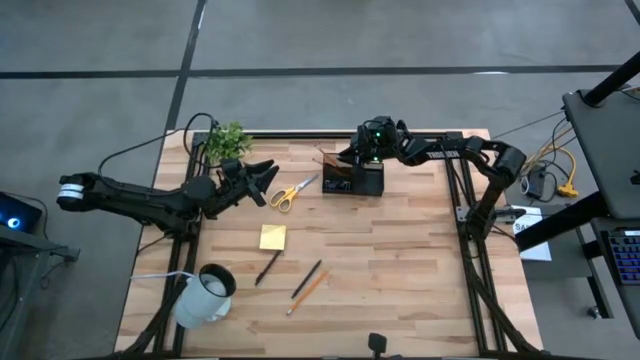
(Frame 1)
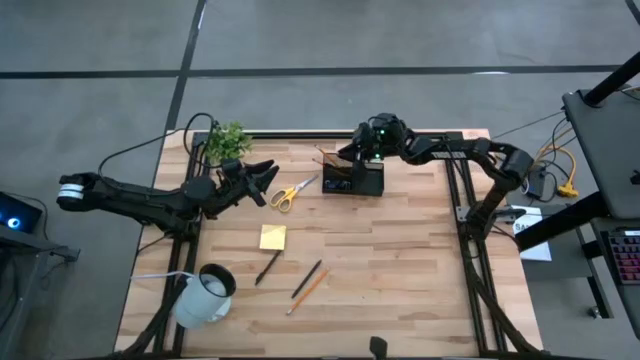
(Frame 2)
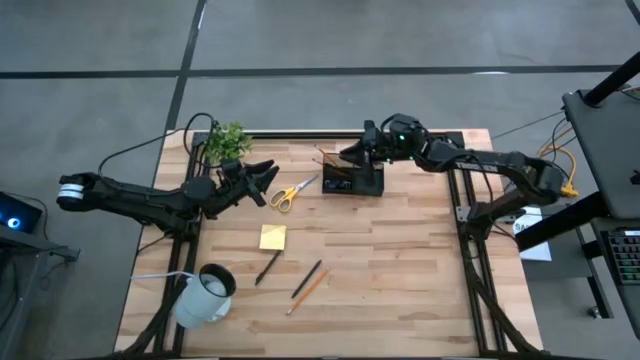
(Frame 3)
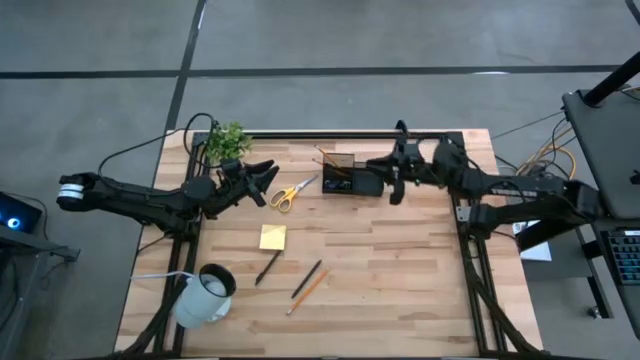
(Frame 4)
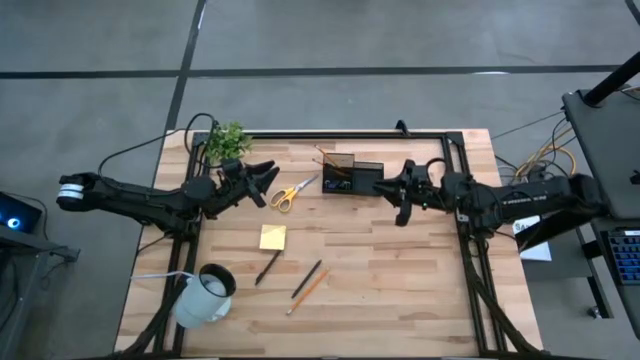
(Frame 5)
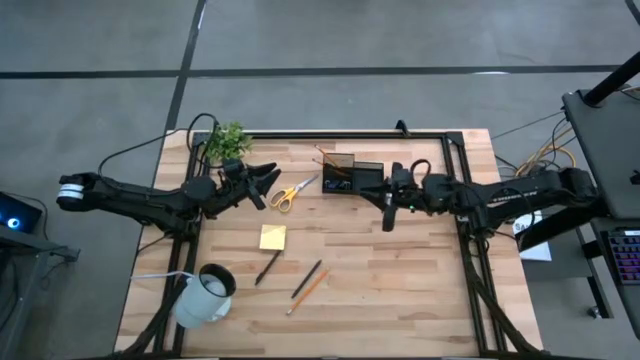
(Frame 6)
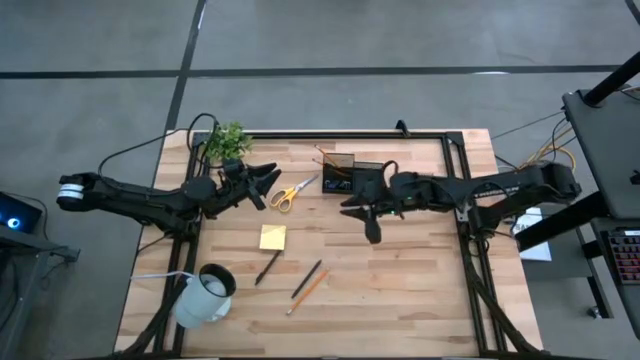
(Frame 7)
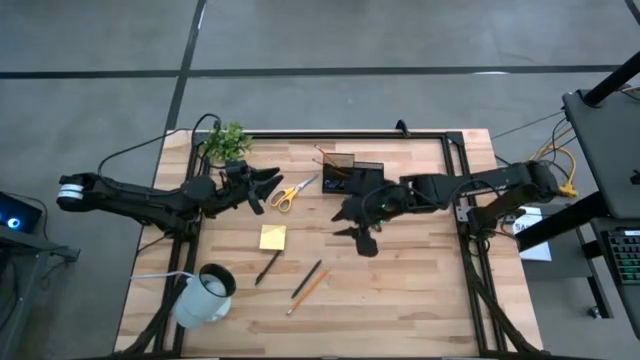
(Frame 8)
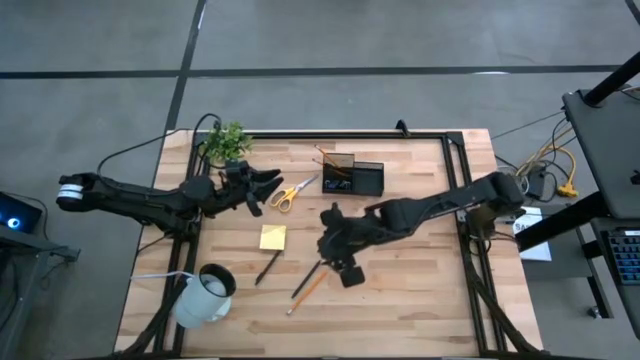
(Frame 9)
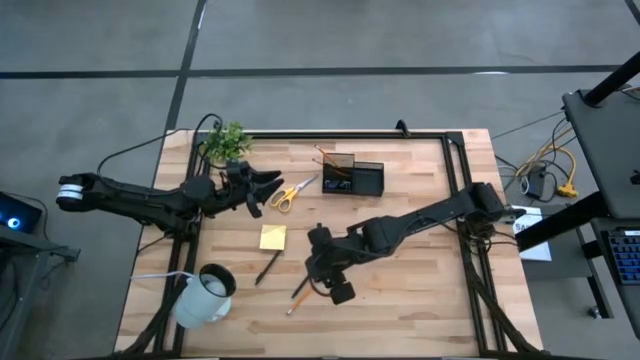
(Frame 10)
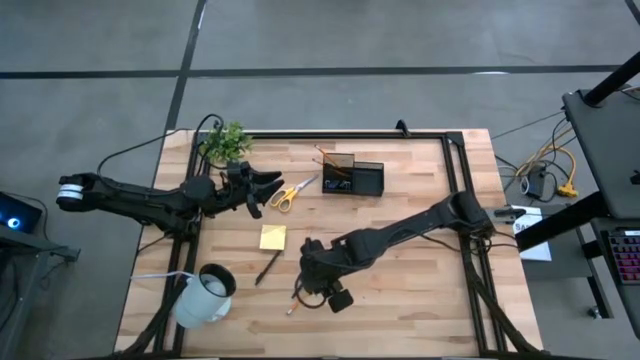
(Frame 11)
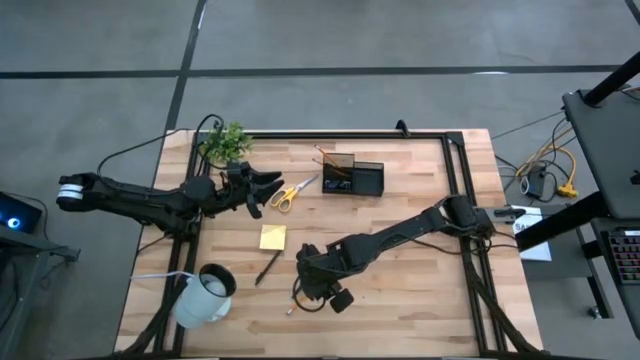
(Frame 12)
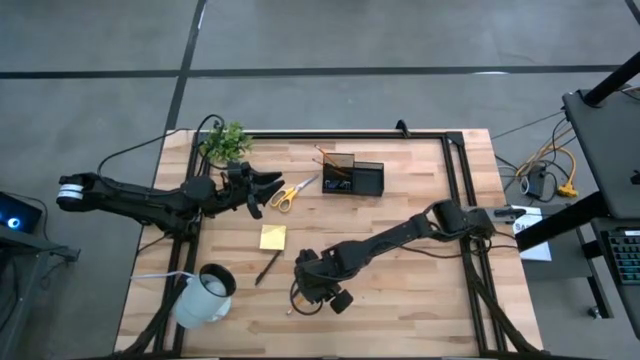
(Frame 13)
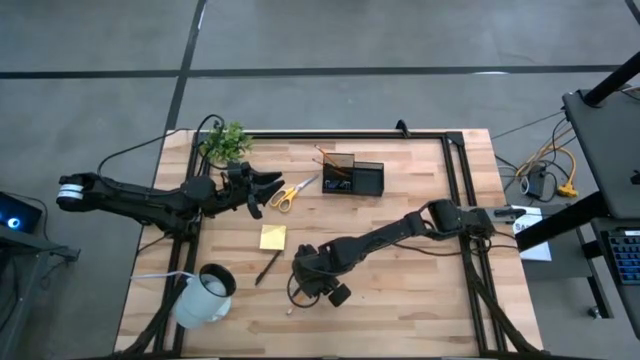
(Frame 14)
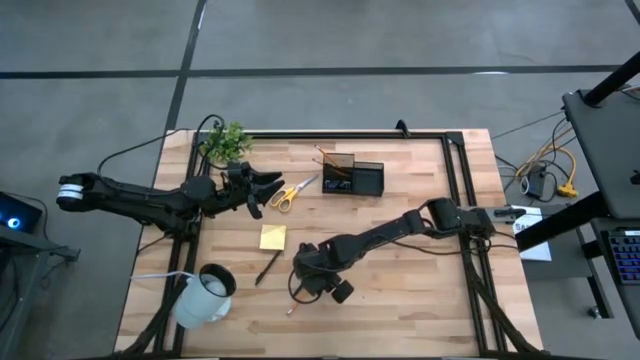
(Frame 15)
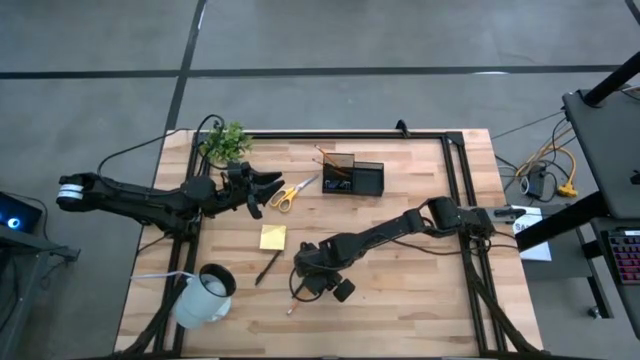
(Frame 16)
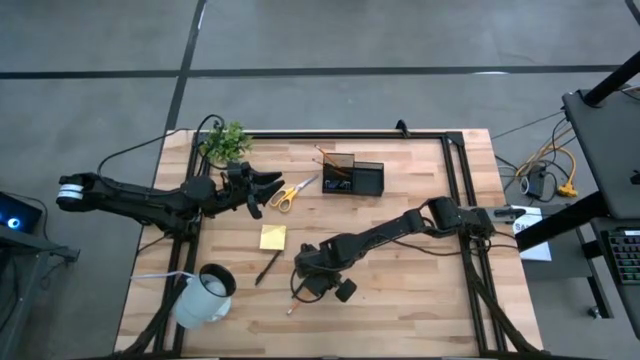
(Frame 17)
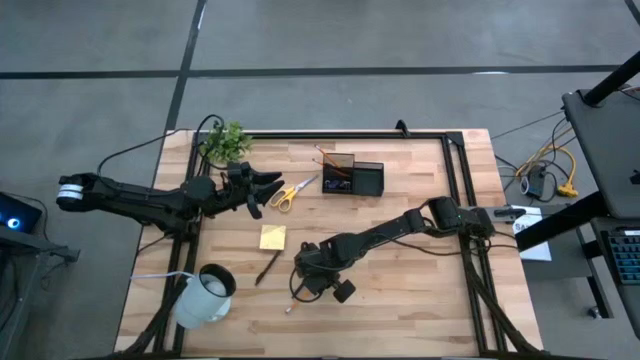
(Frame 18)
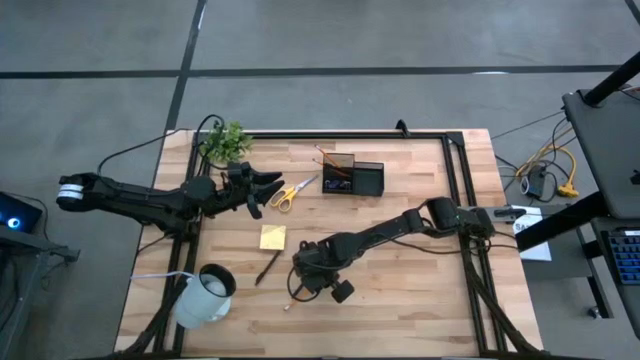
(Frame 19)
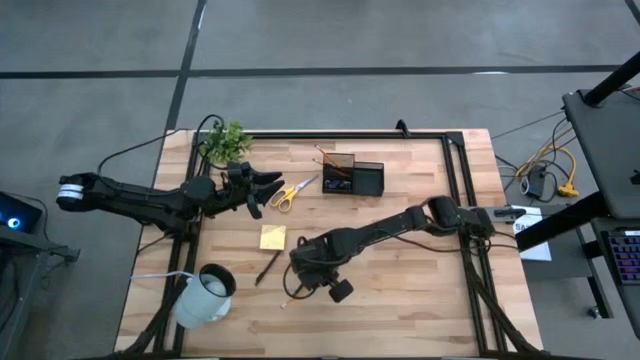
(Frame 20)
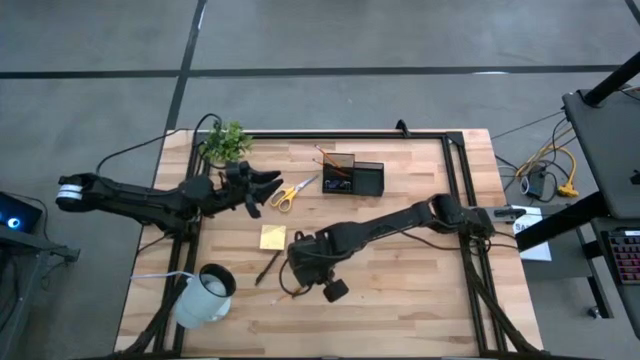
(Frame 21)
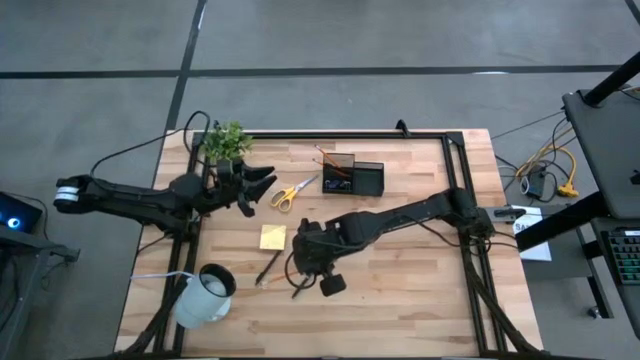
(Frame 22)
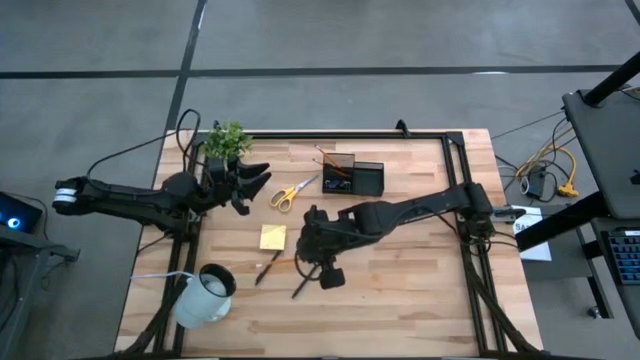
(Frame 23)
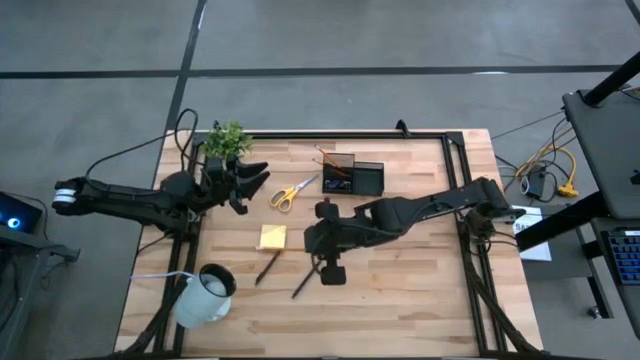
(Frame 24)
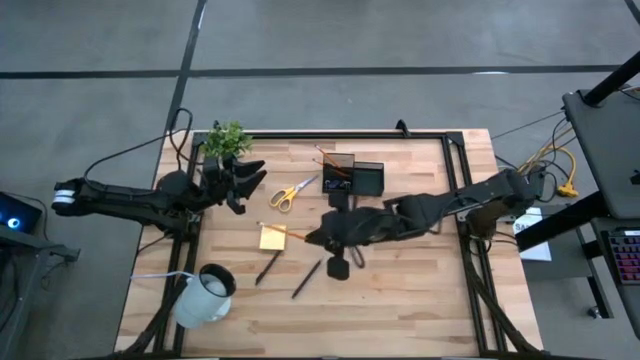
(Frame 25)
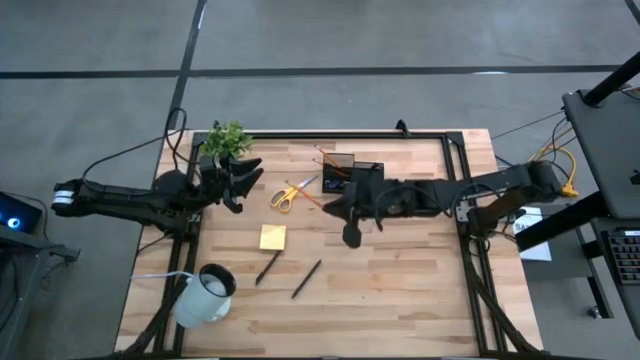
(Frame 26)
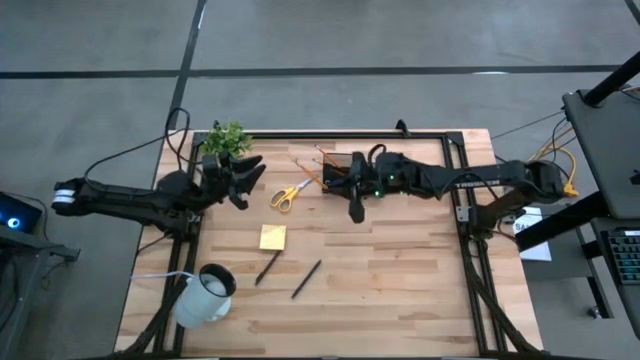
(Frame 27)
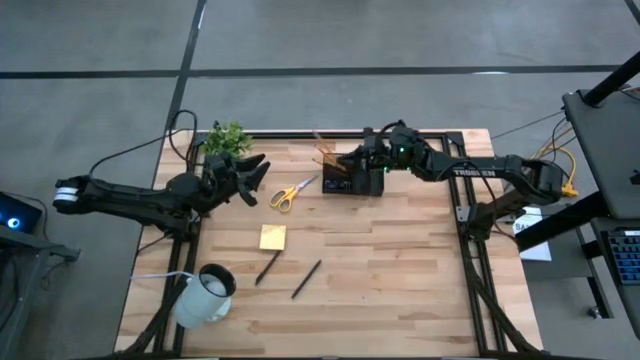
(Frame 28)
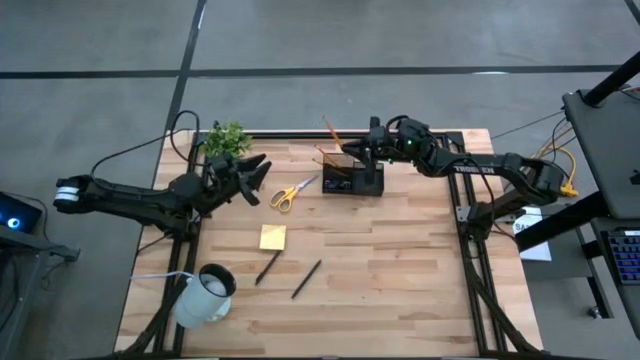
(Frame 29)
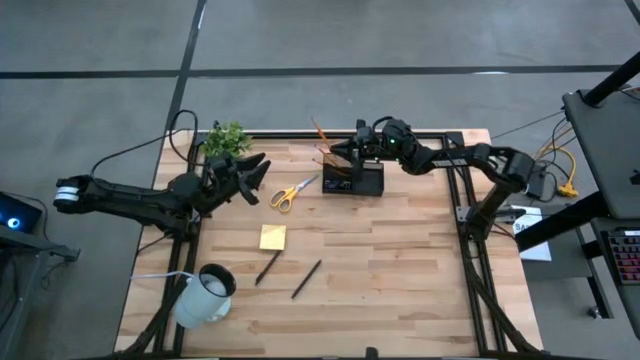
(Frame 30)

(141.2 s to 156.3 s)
Task: Pick and place office supplies into organizer
Put the pencil into the desk organizer

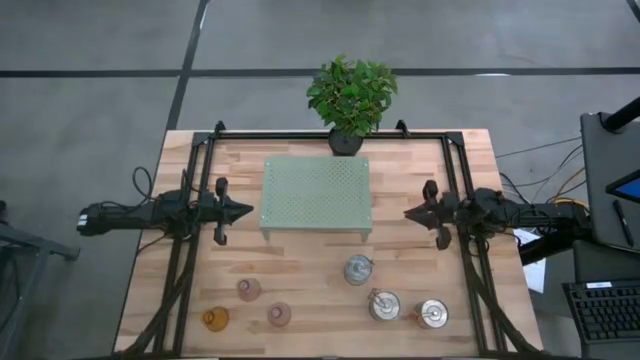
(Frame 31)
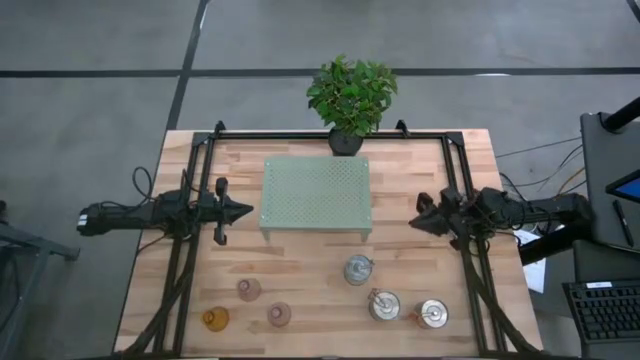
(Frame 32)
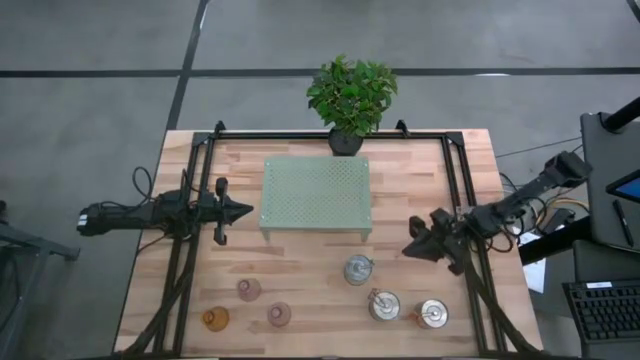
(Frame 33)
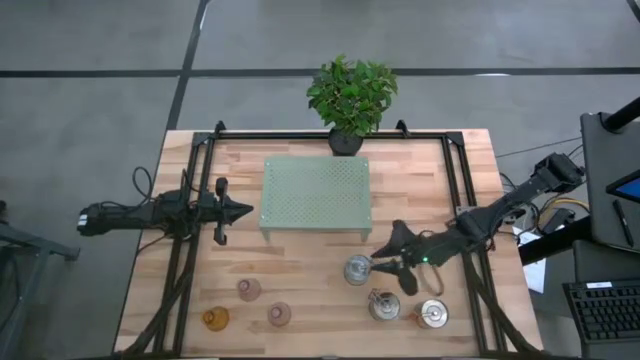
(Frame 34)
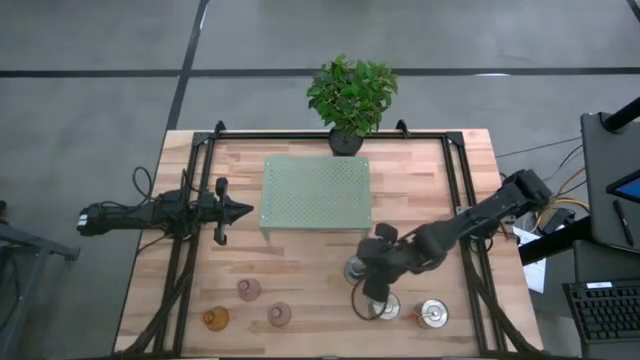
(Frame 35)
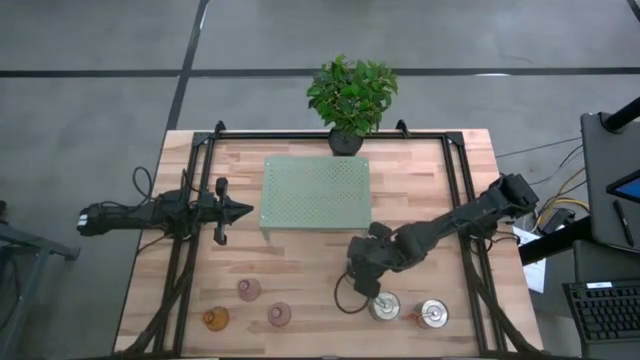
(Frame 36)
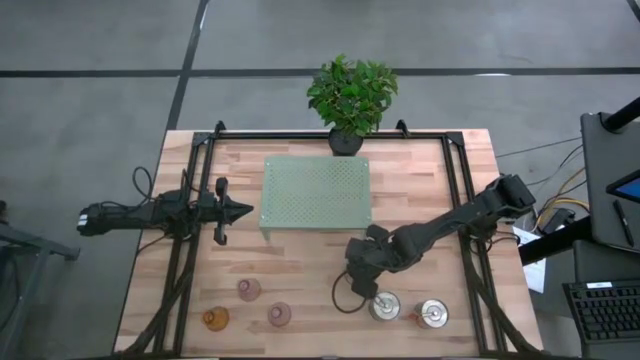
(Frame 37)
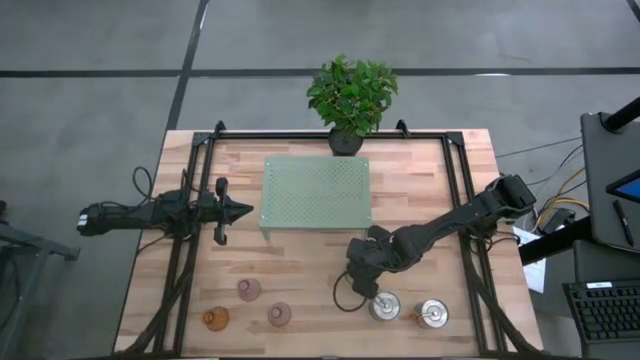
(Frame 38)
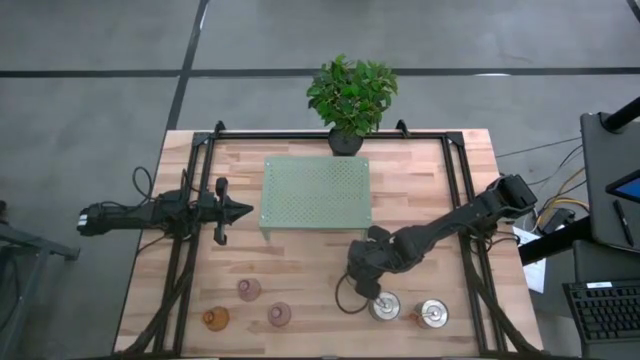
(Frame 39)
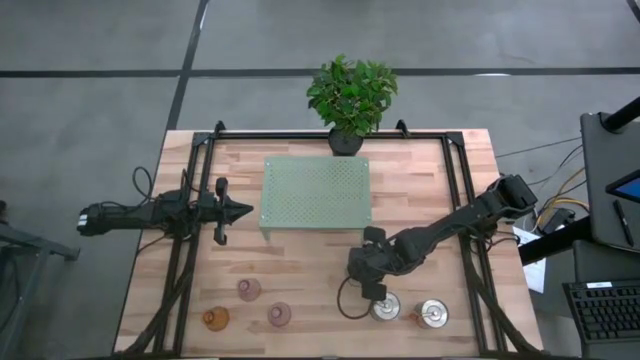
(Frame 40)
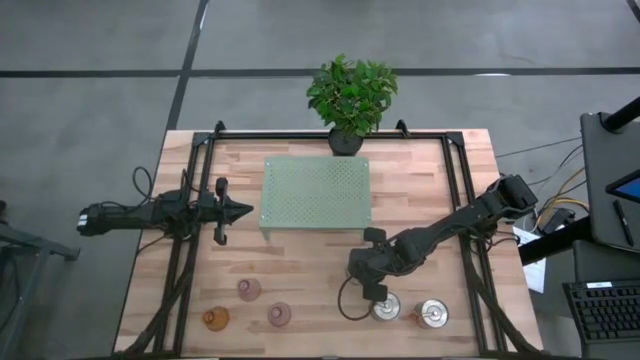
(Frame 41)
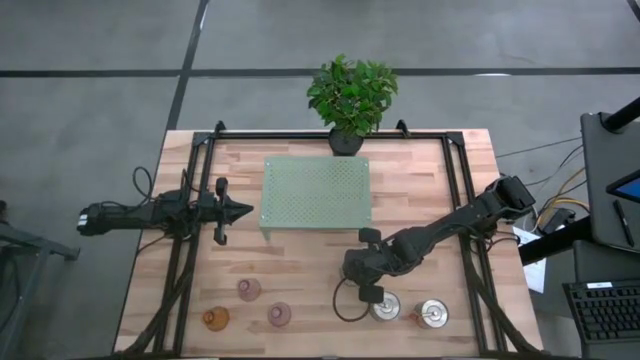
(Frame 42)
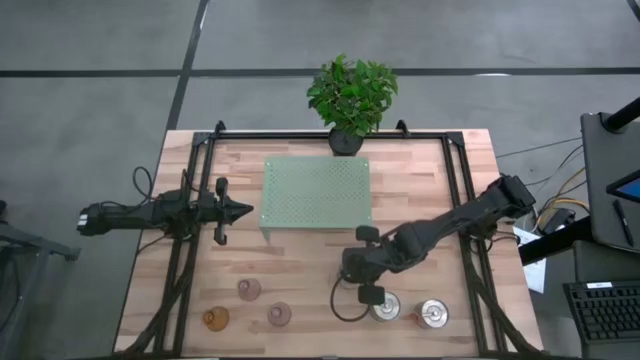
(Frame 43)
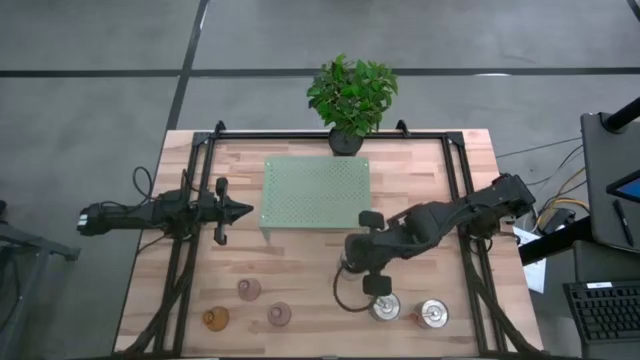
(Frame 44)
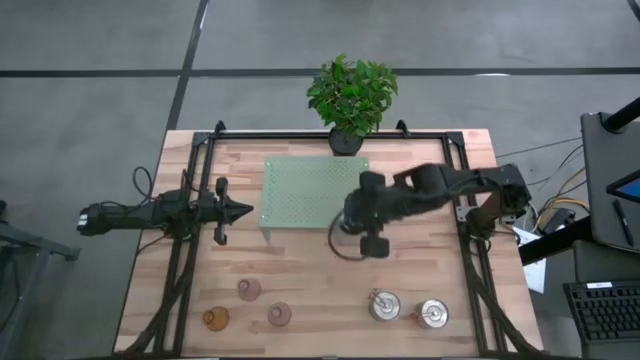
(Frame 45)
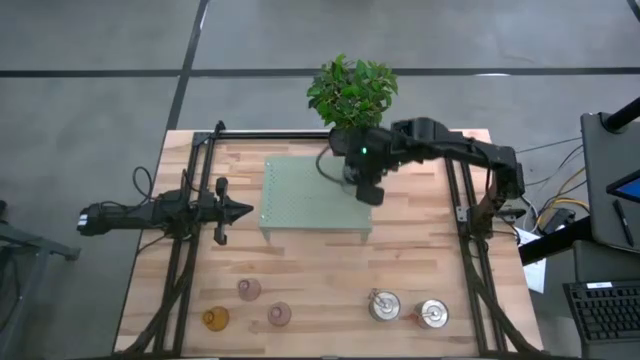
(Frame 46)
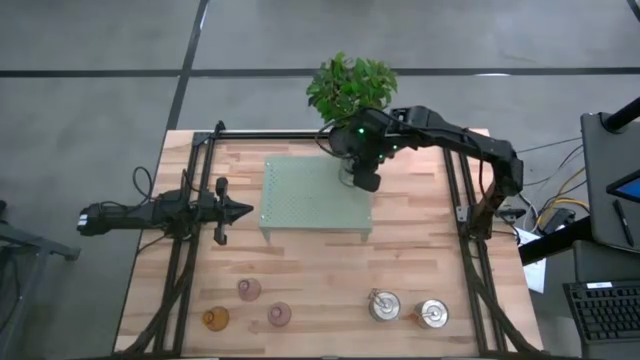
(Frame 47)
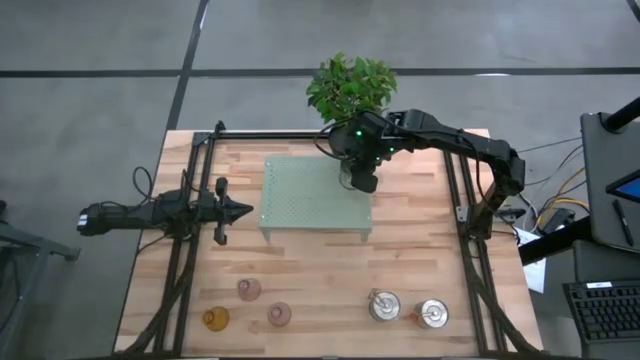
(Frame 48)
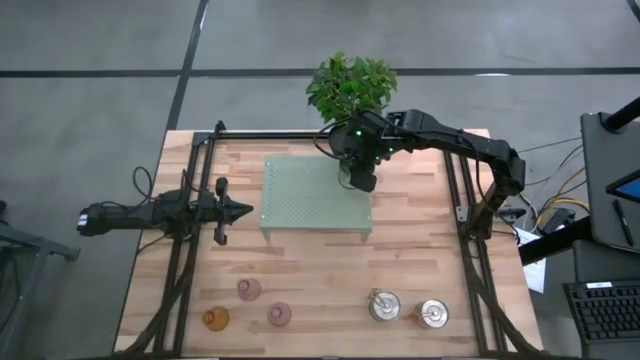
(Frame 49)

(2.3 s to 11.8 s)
Task: Pick & Place candle stick holders
Put the silver scented candle on the shelf
